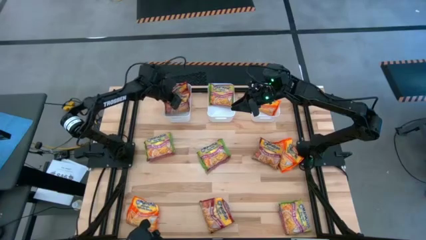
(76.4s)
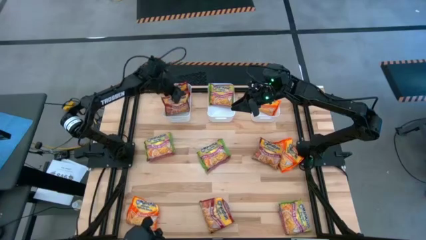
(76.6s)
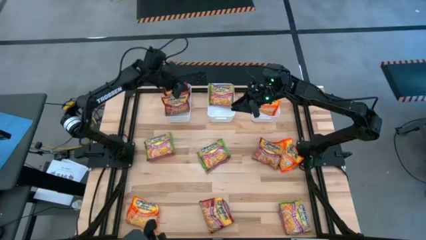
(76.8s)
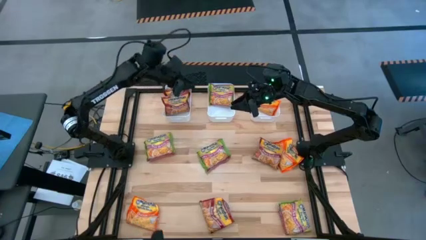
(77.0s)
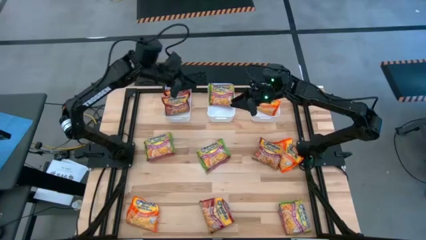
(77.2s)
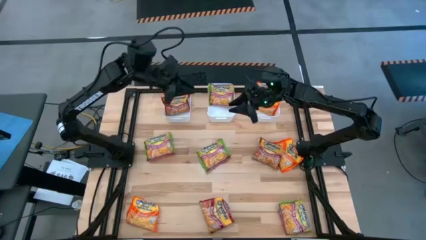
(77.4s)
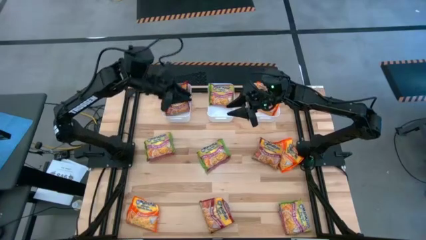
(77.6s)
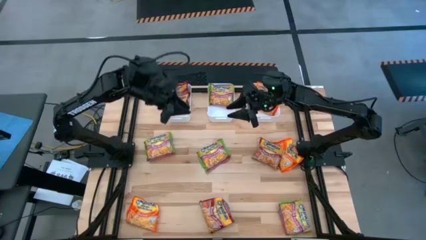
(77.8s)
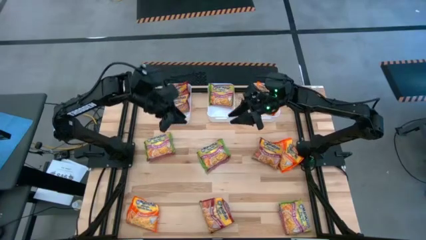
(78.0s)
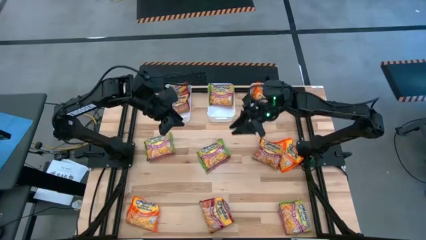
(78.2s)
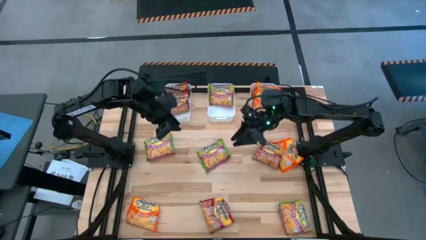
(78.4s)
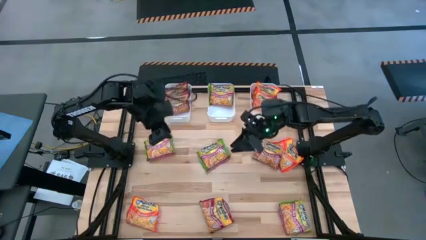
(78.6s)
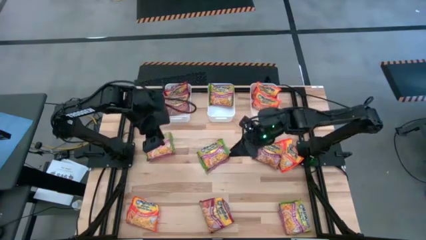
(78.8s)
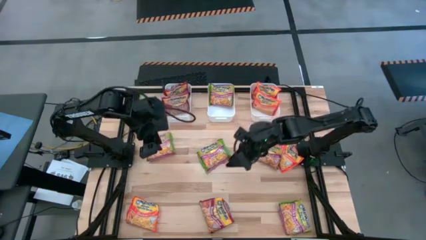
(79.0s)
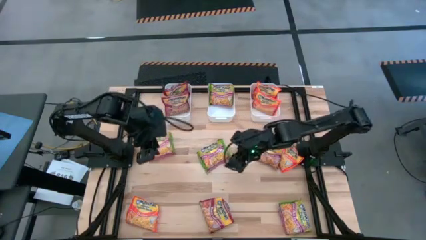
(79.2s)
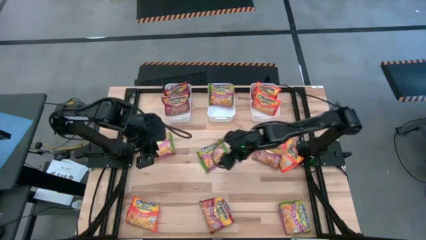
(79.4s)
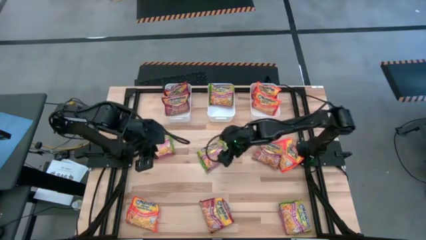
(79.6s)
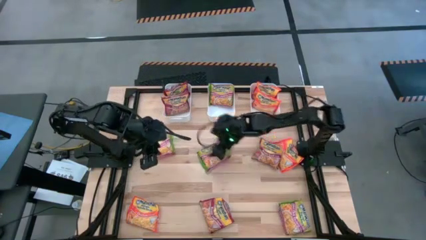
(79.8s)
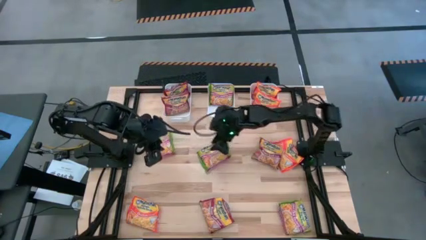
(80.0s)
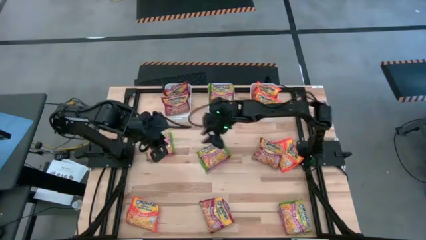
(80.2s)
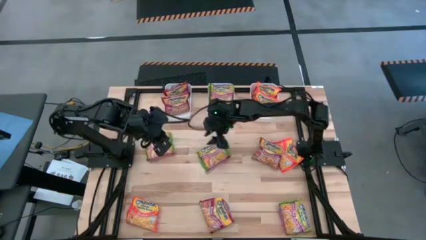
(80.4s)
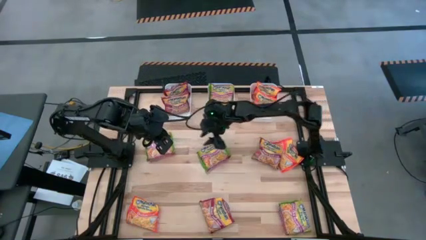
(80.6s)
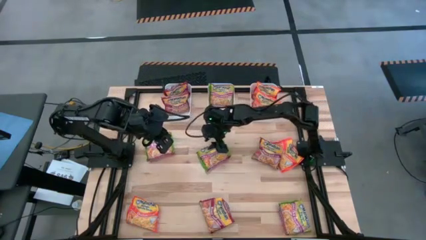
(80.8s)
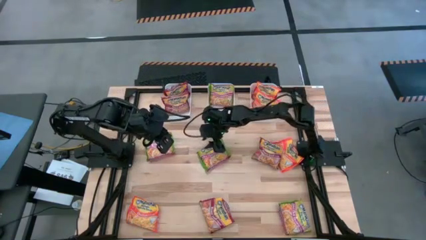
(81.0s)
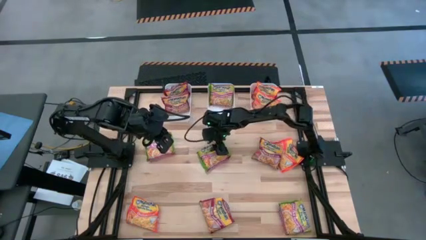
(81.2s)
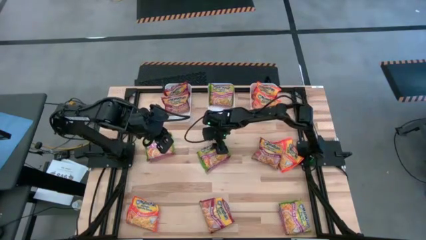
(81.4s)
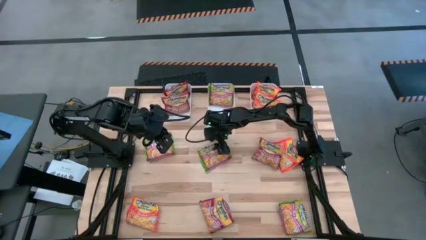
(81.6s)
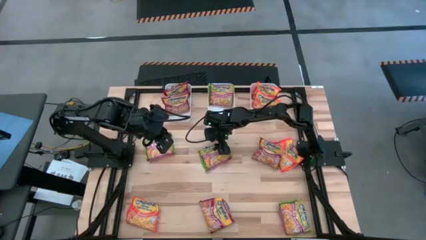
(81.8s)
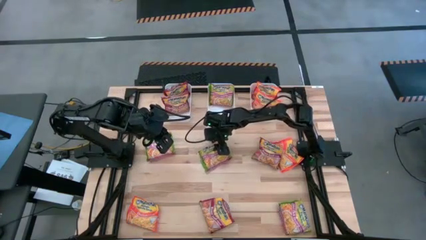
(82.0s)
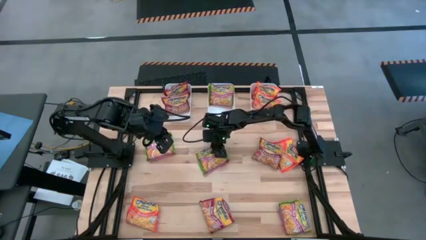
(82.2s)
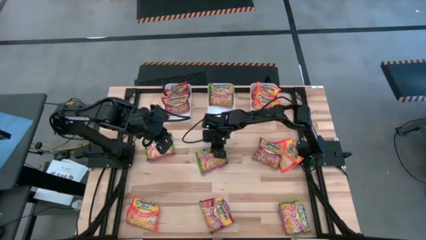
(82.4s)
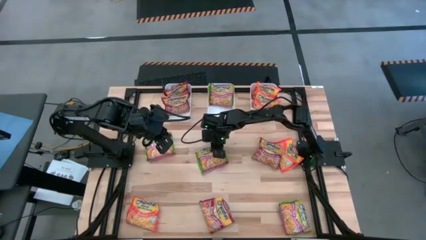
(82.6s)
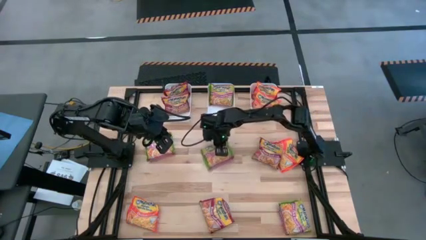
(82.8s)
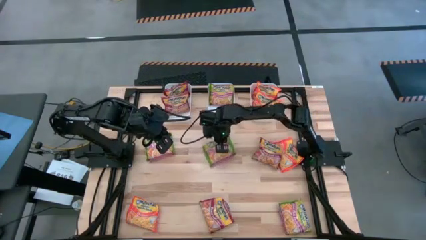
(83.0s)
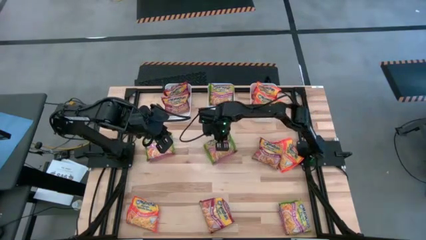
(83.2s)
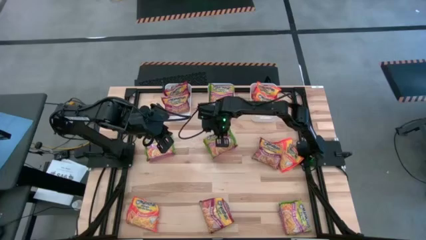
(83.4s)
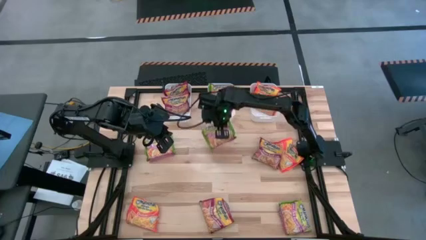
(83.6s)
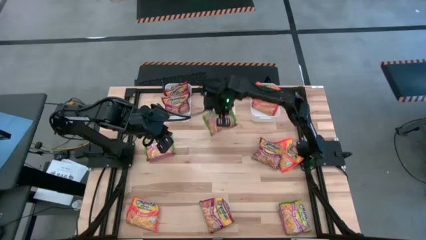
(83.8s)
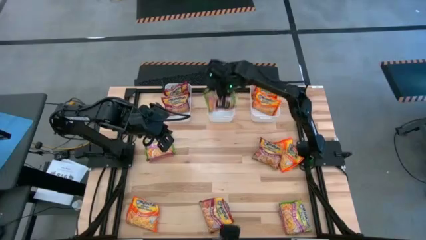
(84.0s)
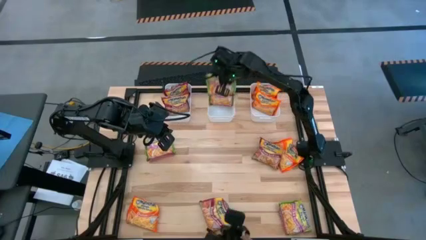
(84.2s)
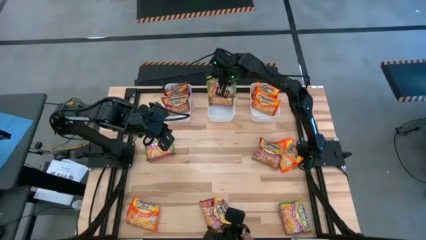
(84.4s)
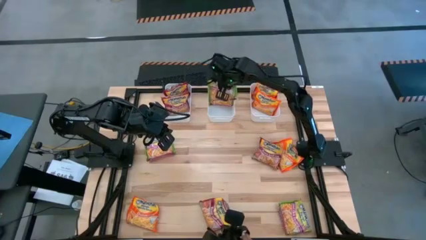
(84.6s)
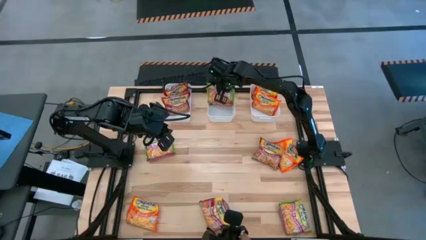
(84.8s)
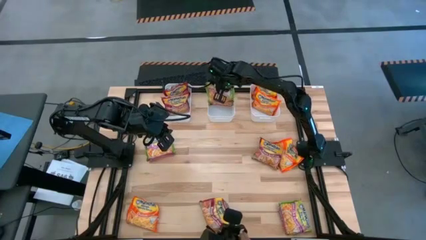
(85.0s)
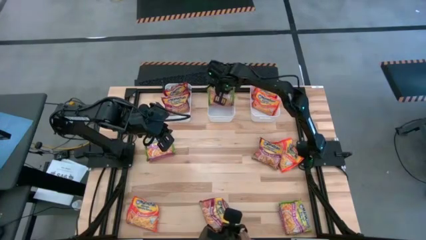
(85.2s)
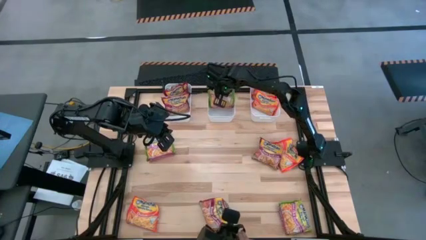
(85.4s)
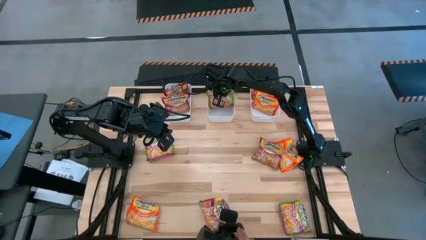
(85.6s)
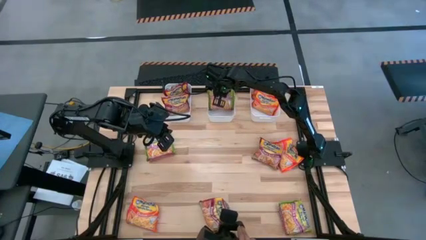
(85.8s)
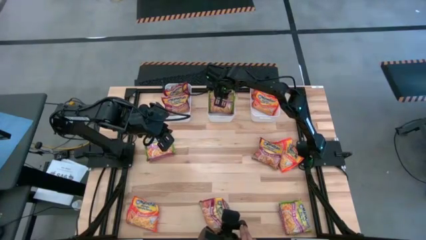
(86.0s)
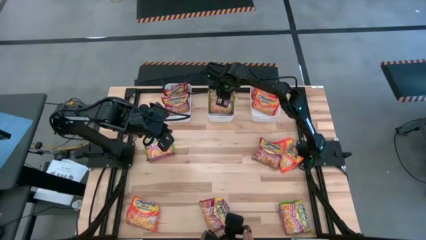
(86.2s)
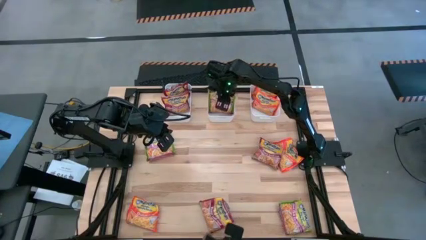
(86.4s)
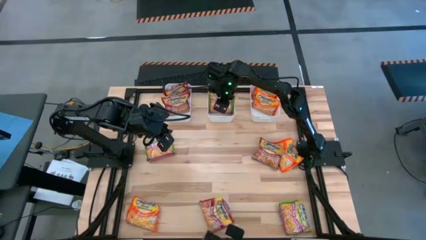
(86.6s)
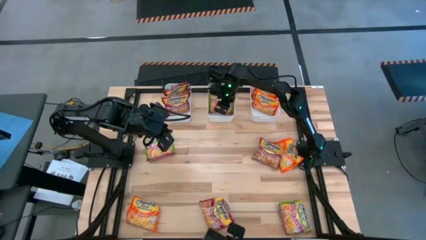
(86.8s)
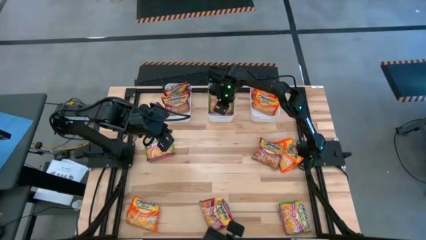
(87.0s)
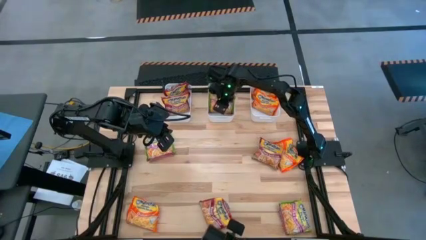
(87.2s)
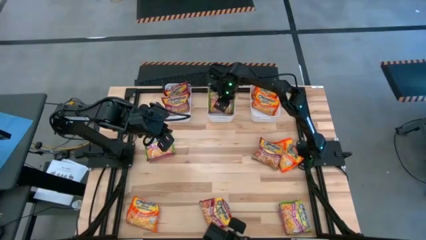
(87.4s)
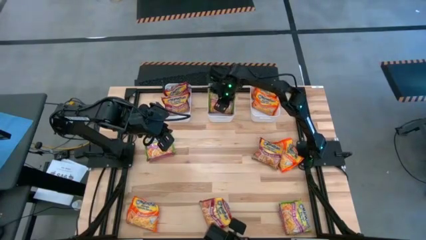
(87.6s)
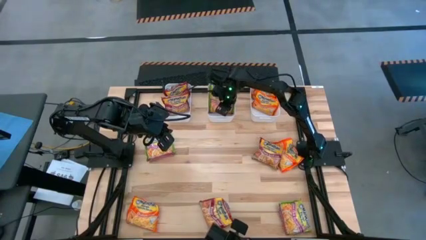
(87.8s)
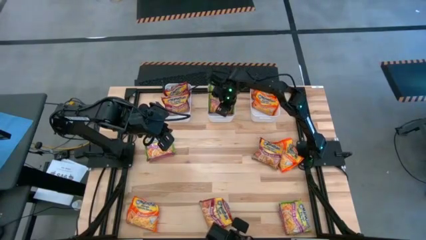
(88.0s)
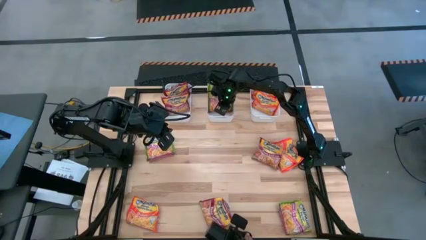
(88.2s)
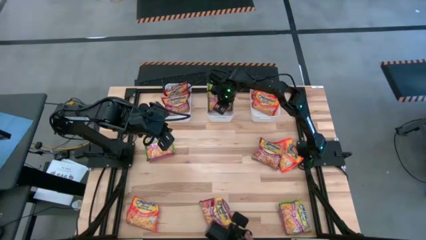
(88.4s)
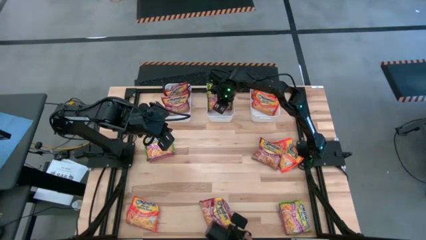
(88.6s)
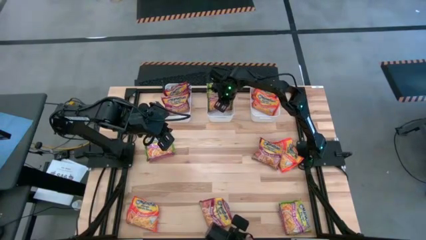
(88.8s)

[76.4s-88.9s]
Task: Sort Maruchan noodles
Put the green noodle pack into the middle white bin

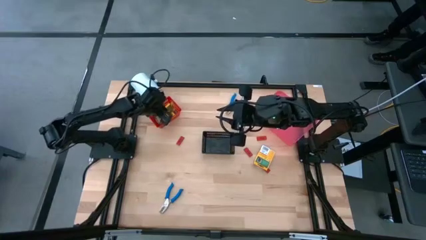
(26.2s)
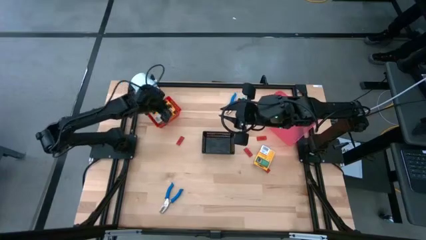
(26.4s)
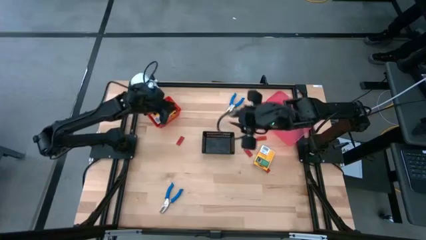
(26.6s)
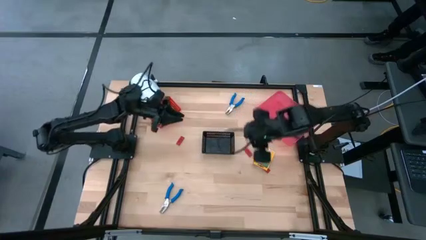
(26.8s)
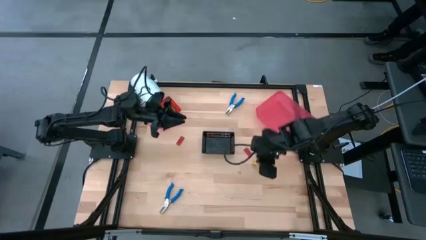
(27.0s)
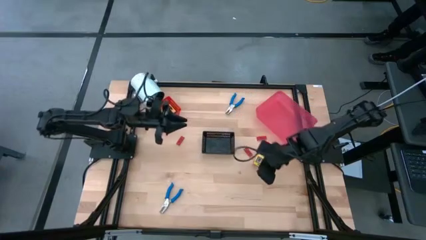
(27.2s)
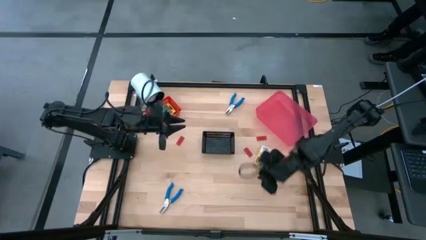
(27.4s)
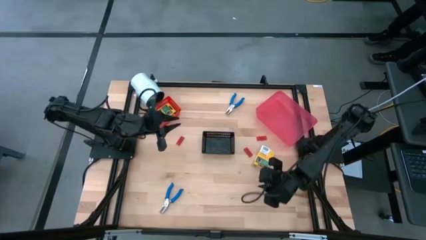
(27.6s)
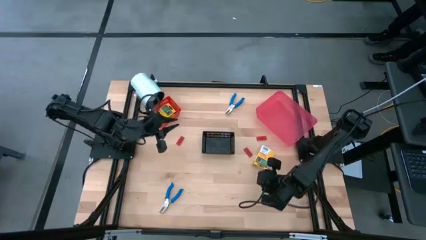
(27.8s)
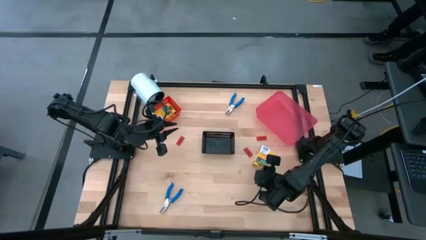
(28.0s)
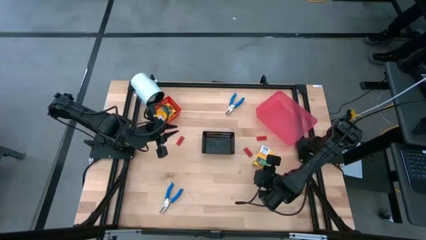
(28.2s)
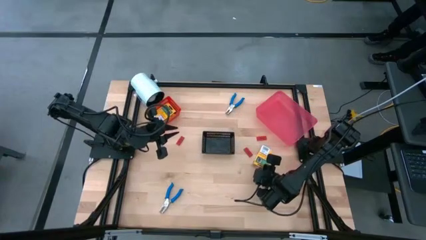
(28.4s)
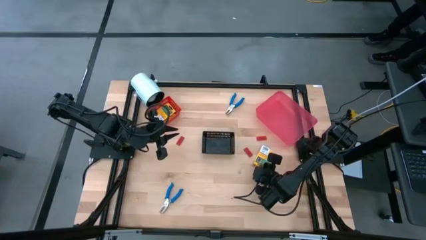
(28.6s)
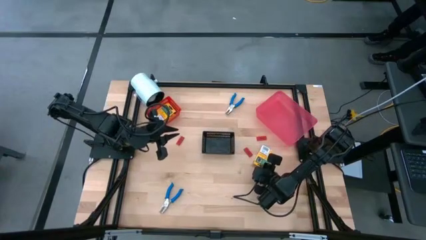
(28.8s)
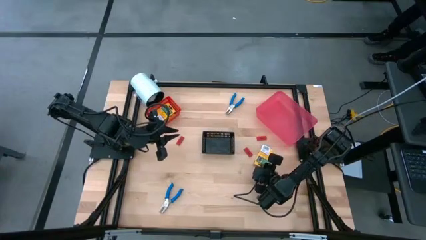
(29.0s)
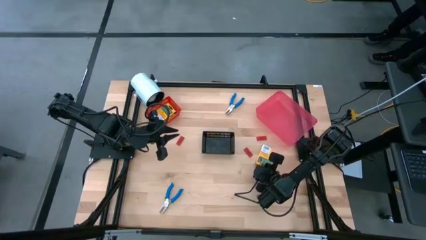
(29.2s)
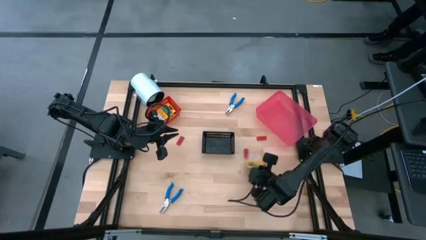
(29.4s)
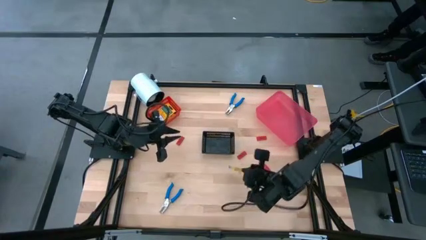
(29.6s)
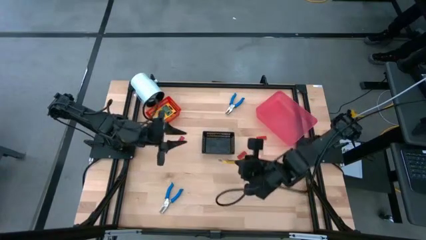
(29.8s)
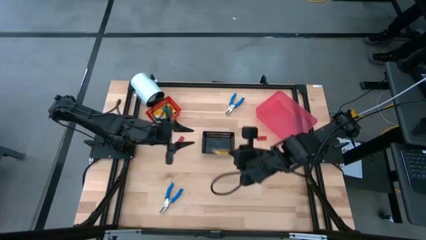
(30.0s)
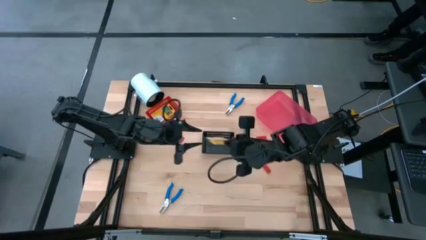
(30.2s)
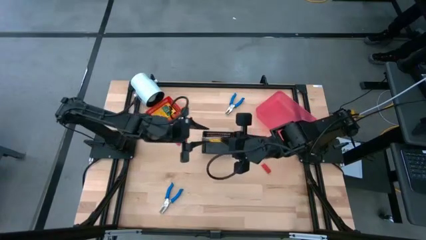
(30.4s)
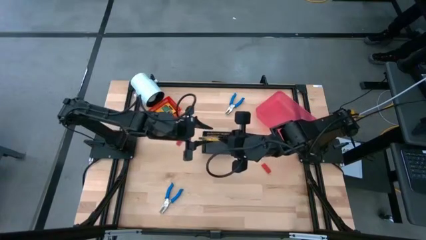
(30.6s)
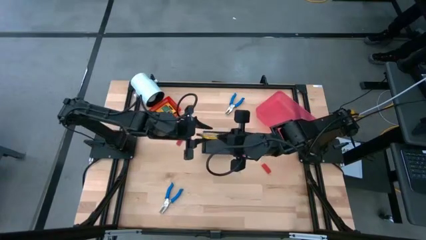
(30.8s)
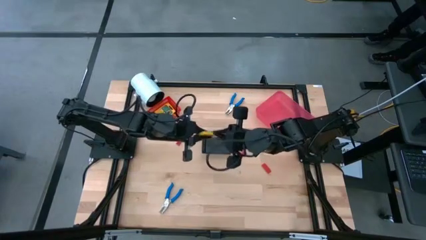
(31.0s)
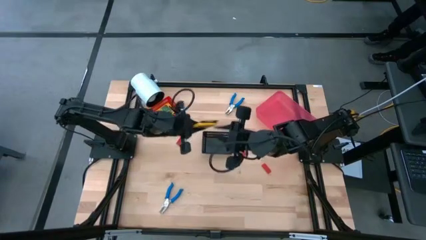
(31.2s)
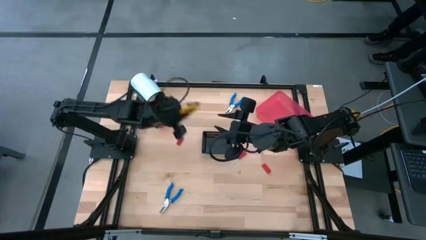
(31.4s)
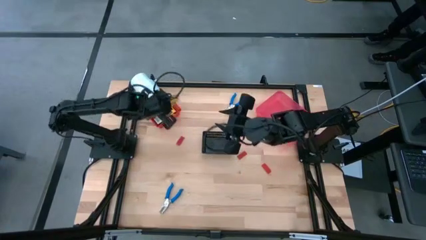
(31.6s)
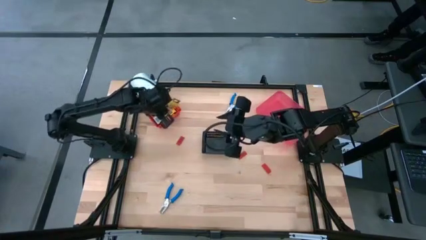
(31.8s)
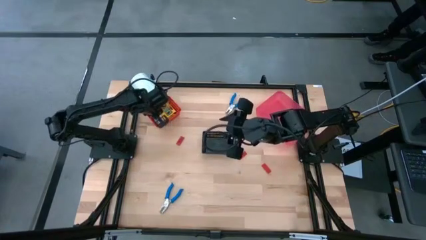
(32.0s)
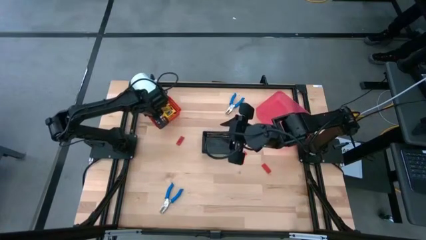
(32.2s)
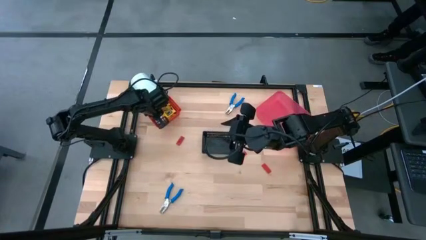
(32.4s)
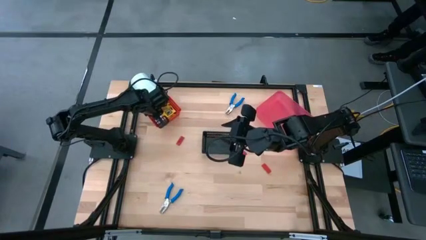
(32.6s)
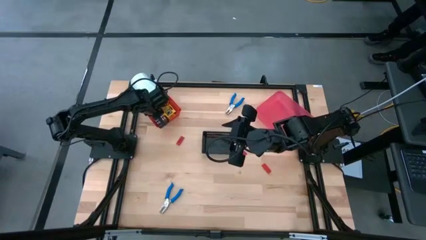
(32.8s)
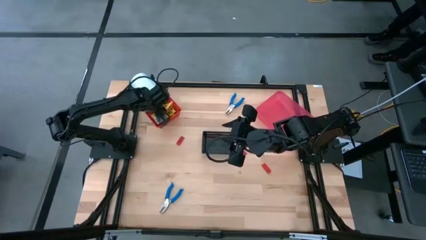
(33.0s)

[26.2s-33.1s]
Task: Pick & Place School Supplies
Put the crayon box into the red bin
